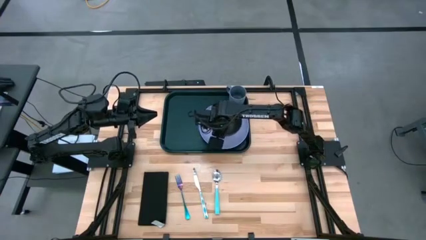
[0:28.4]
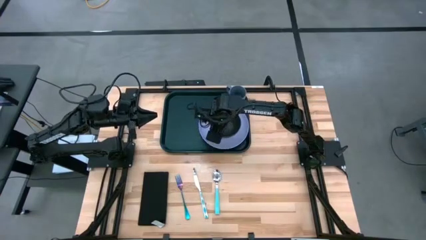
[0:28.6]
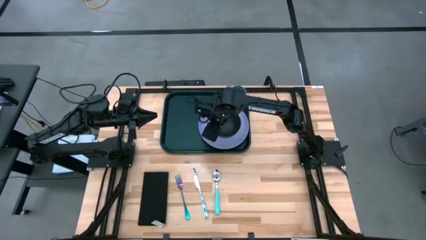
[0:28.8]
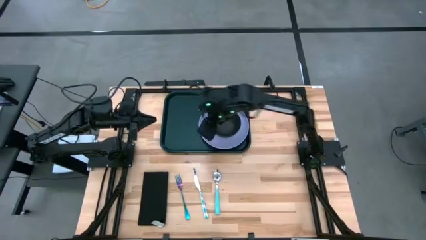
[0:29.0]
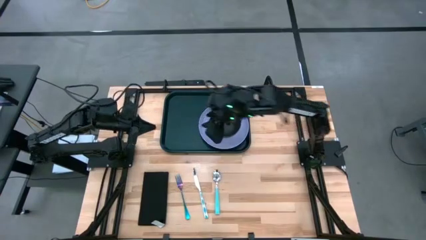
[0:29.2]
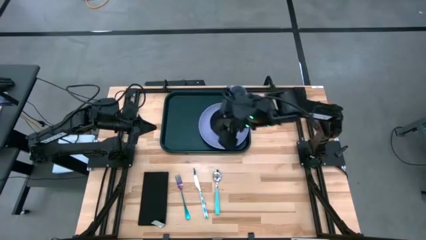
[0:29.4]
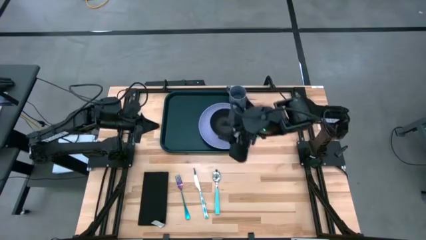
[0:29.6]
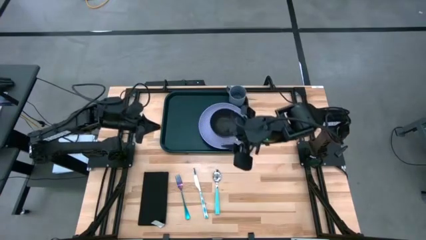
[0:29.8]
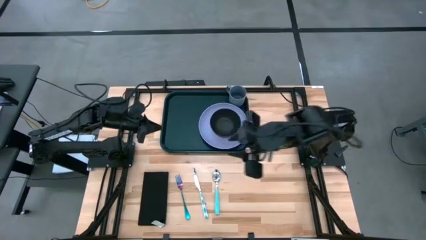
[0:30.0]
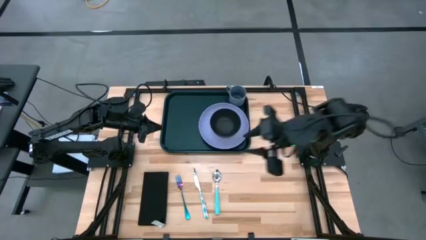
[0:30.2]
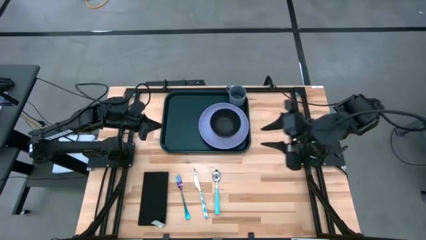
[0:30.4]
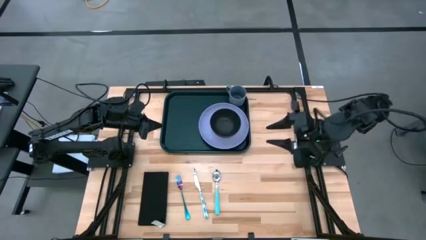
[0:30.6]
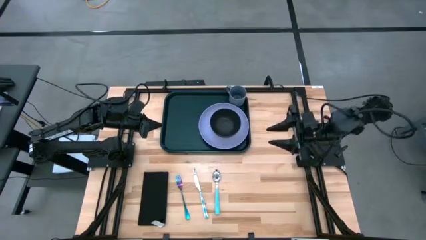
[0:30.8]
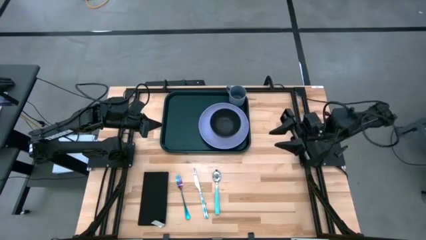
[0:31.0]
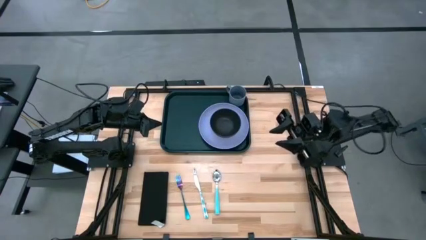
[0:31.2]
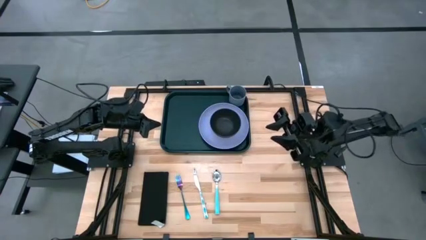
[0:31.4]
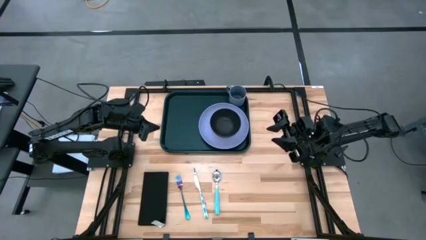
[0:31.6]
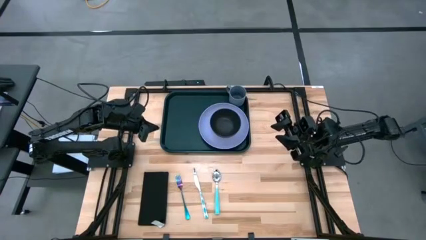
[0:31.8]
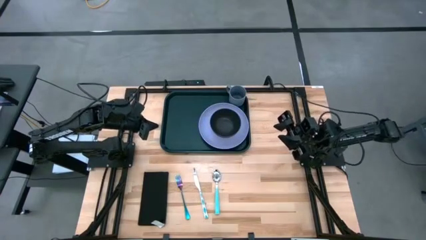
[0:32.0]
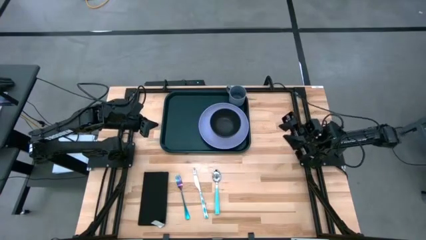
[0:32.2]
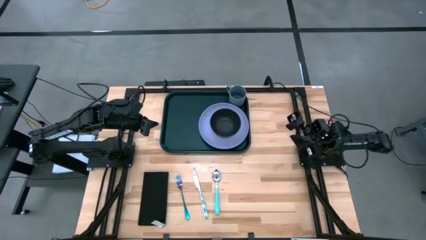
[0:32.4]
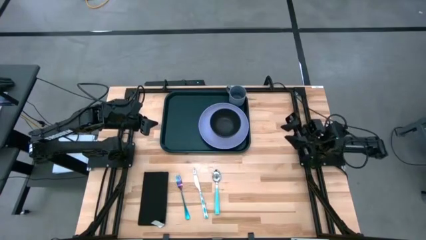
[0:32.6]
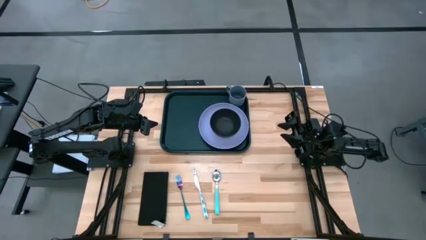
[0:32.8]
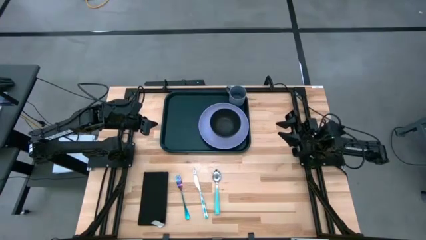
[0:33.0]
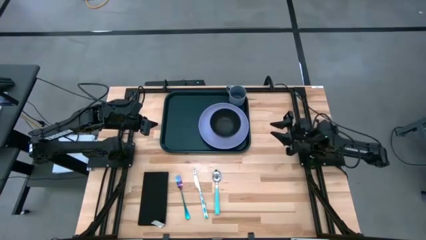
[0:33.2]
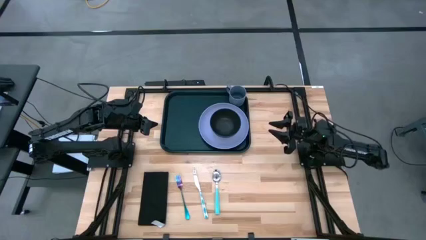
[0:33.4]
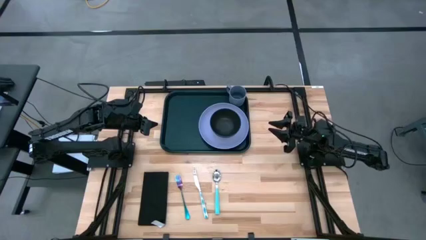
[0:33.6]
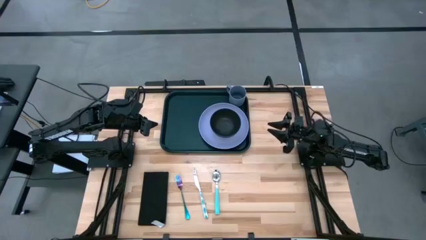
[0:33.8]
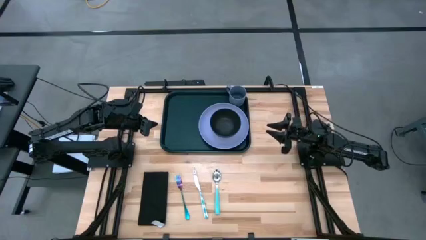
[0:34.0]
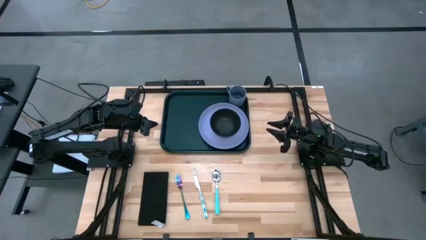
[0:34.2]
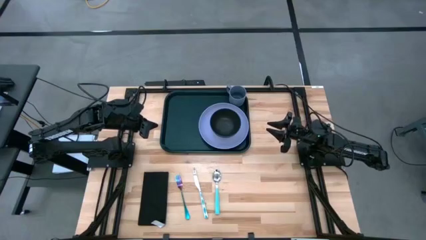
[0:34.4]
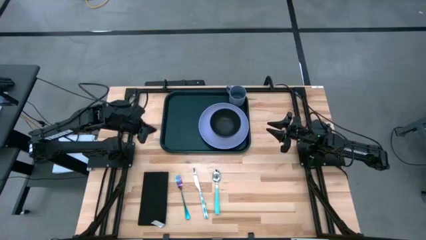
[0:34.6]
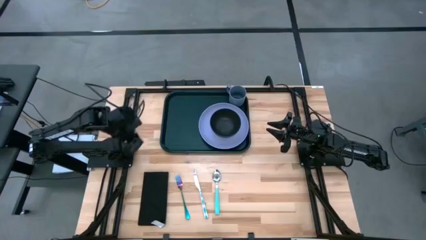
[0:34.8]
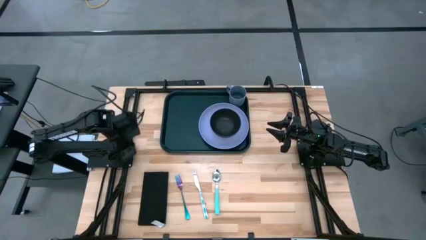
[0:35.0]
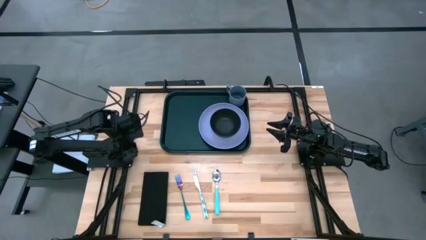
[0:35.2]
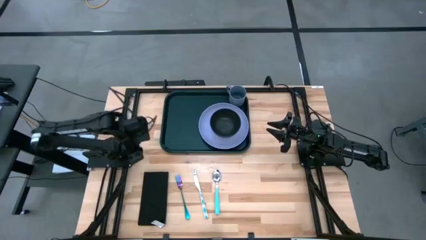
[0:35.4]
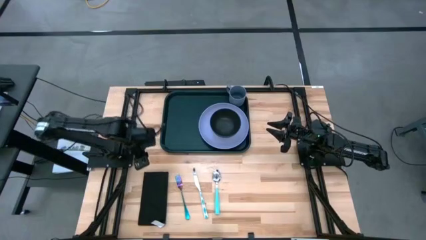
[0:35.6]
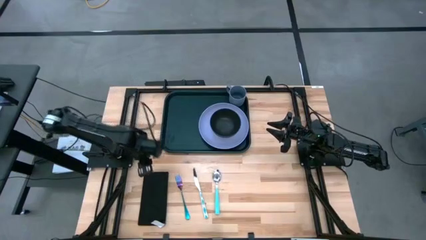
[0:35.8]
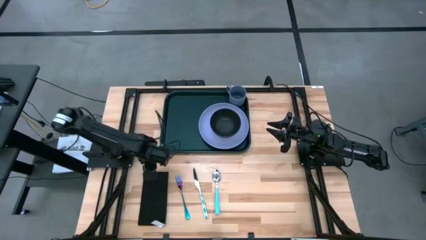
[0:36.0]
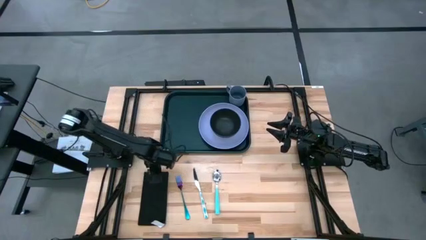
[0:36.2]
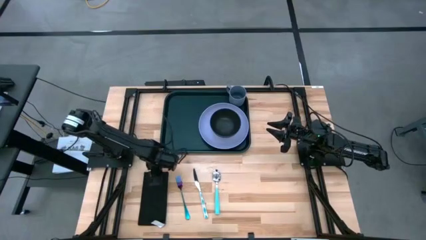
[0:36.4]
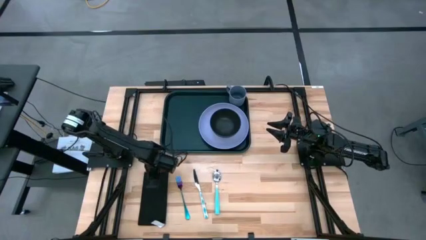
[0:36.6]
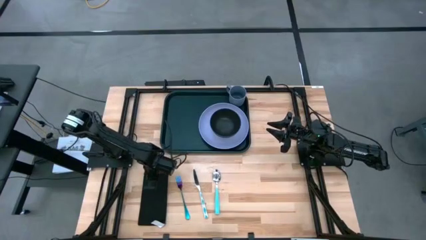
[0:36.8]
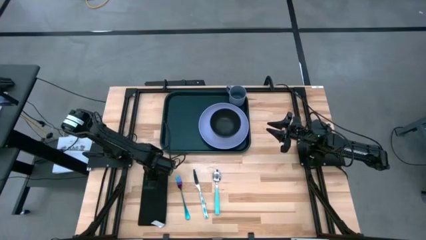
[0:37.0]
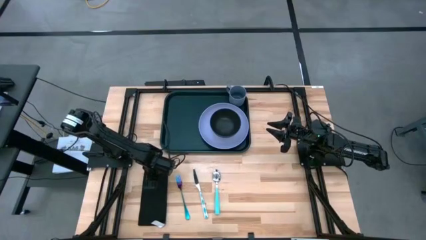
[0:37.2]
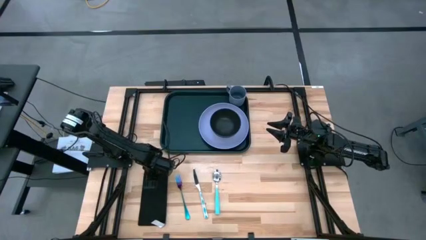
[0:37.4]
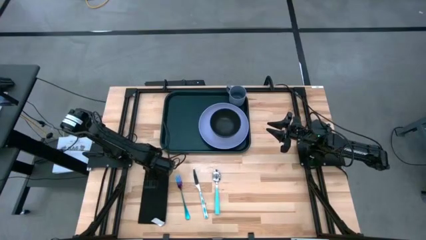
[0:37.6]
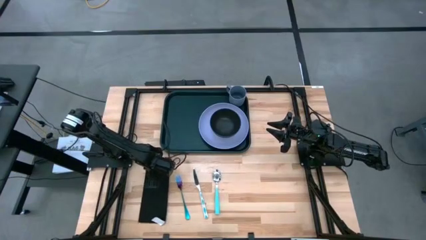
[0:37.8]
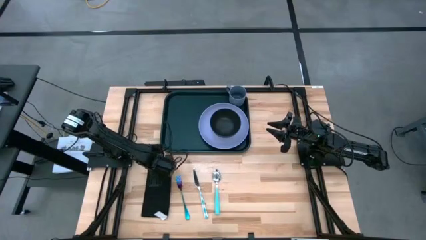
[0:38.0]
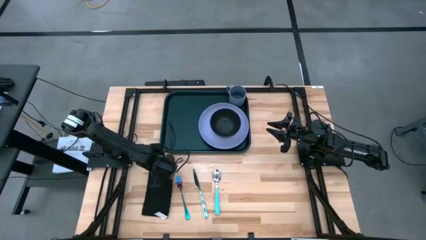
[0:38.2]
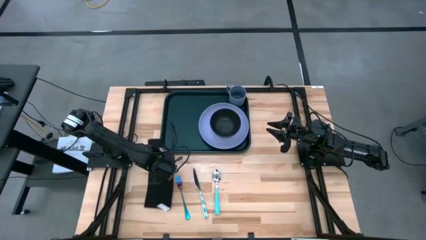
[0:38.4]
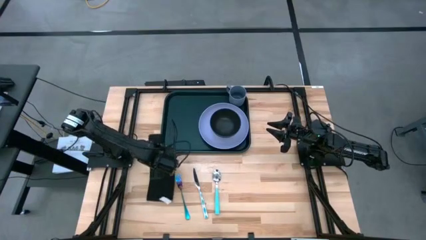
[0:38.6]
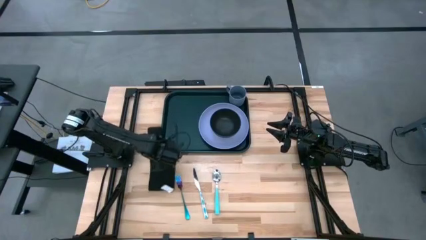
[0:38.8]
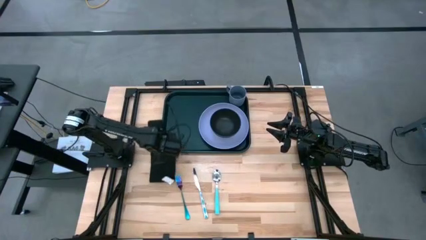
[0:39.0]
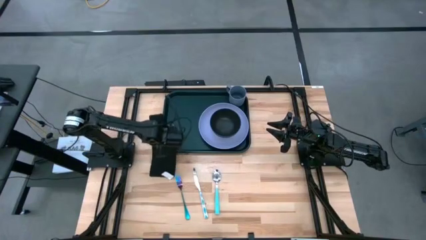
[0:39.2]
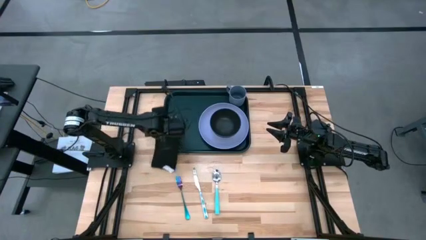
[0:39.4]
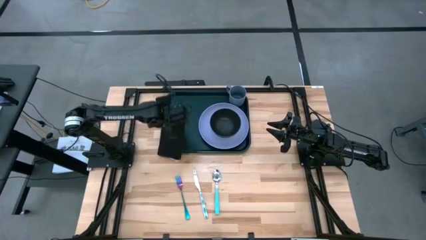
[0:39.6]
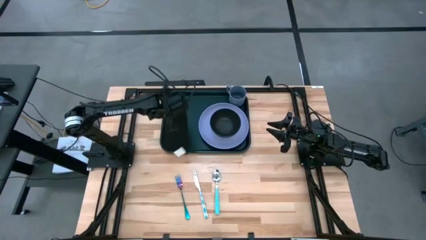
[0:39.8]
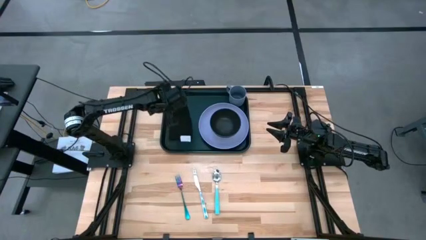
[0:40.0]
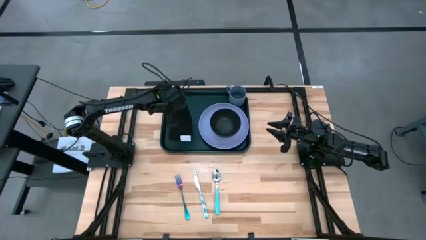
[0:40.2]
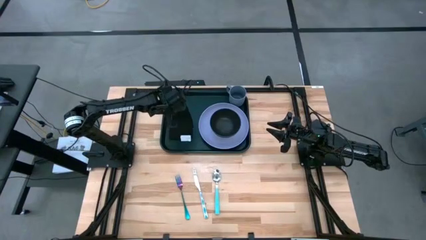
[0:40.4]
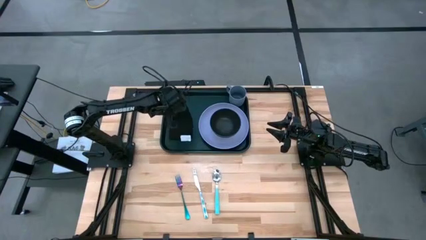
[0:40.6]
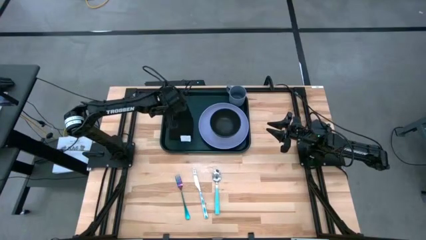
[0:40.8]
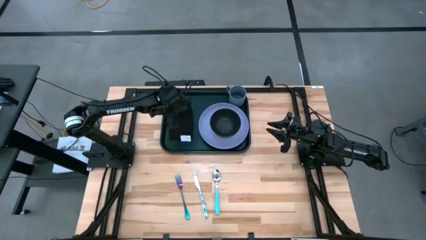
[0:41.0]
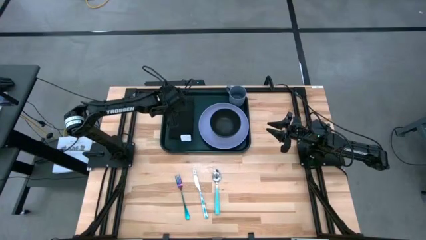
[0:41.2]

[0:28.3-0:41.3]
Task: Set up tray
Put the black napkin to the left of the purple plate on the black tray

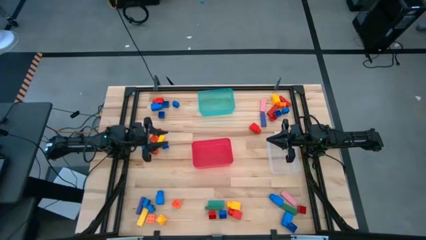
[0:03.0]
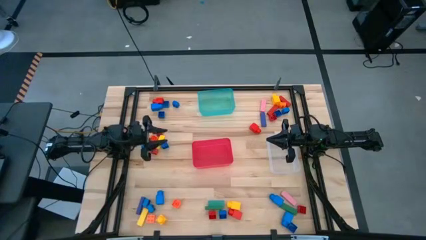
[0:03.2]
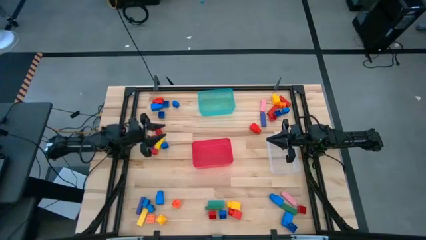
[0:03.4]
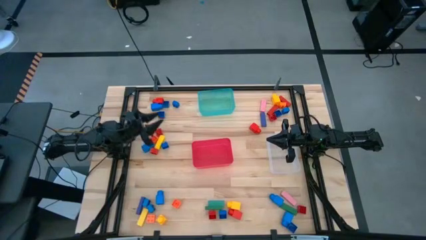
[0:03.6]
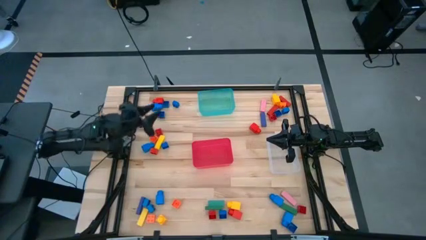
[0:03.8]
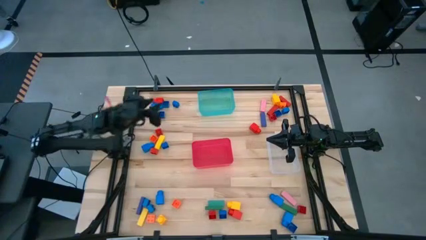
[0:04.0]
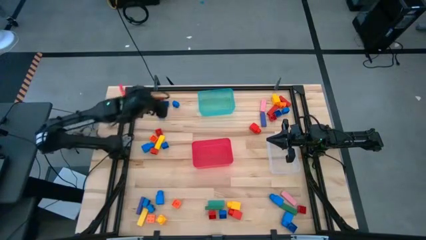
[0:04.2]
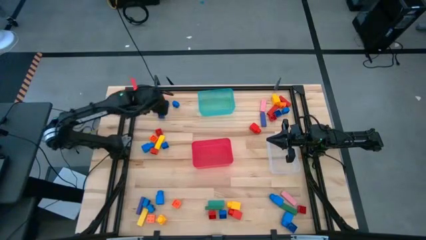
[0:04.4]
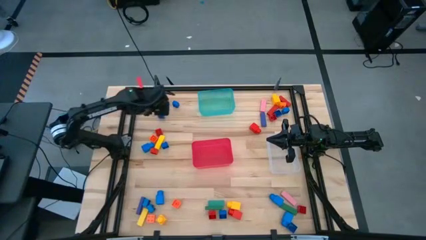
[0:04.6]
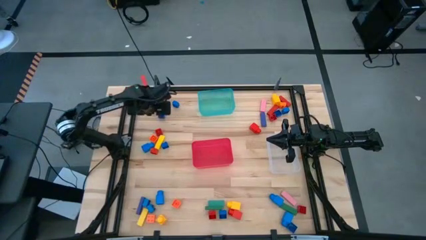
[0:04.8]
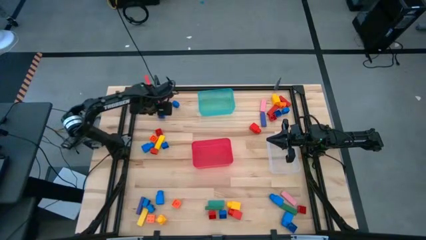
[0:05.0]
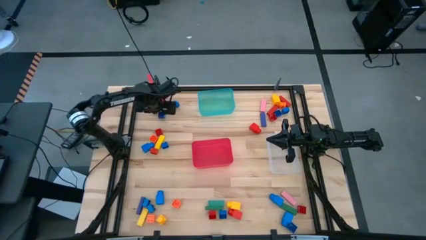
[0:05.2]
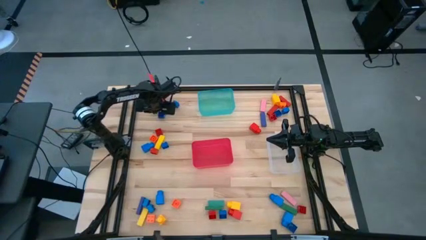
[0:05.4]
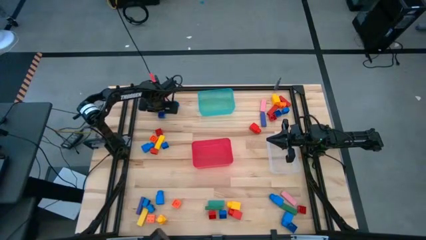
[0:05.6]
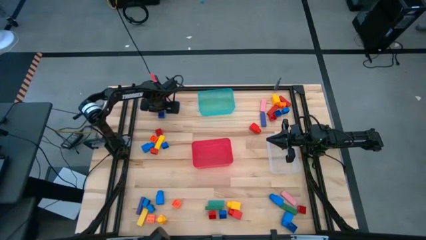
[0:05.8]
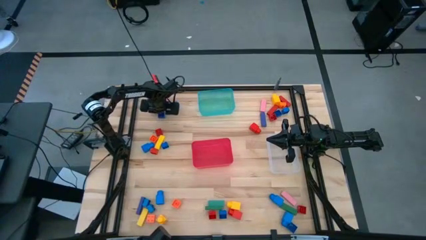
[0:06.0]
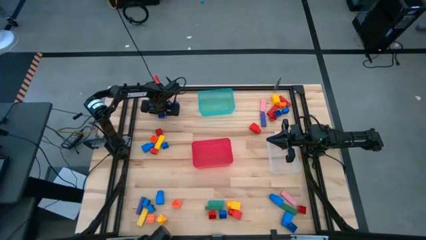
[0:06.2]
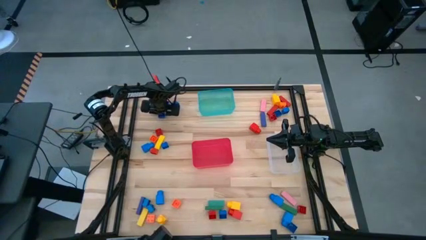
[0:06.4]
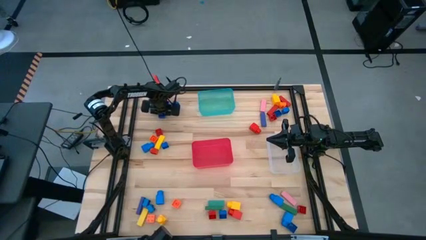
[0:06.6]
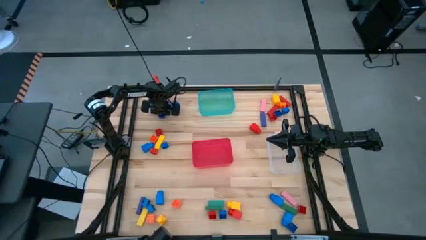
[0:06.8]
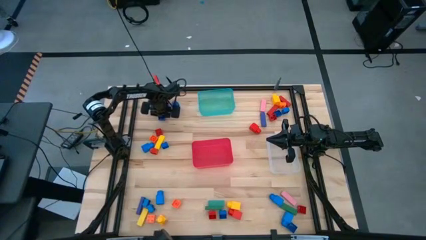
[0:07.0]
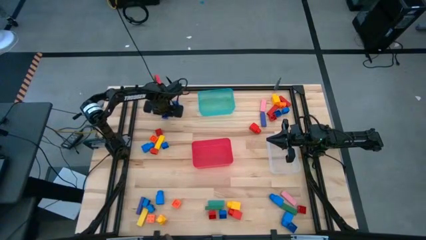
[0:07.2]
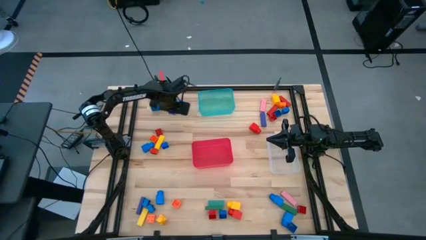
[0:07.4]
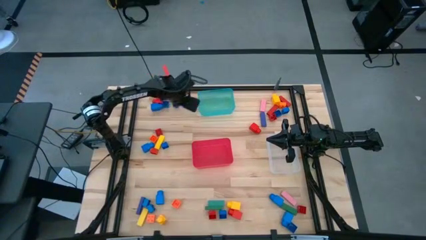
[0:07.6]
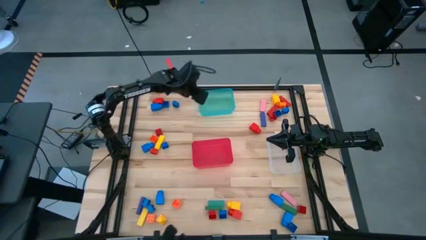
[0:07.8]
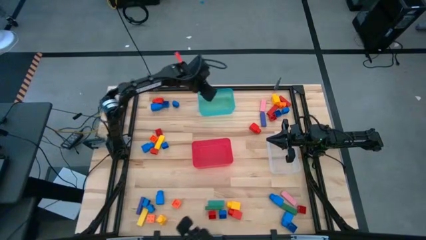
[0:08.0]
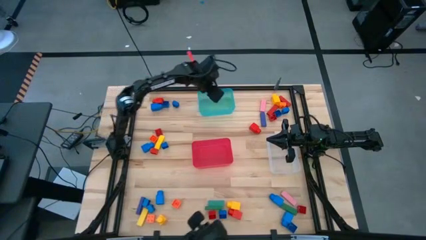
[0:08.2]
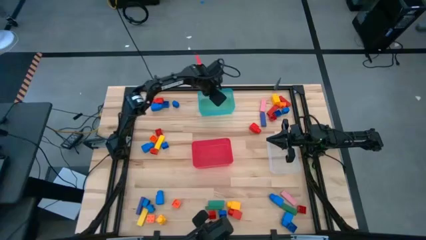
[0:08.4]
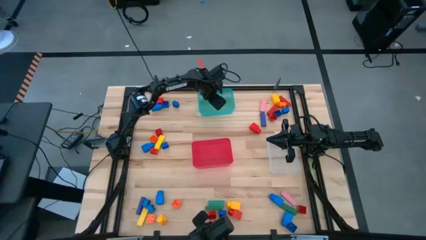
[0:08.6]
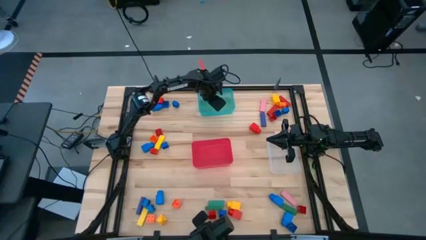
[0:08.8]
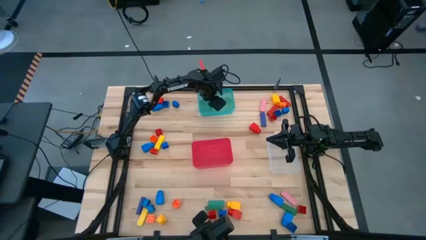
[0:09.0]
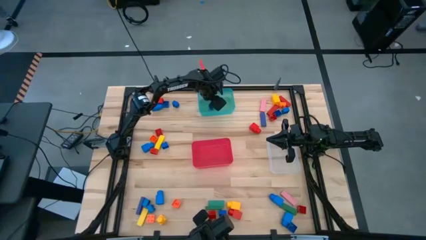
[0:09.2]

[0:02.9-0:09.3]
Task: Sort blocks by size
Put the blue 4 stud game piece into the blue bin
